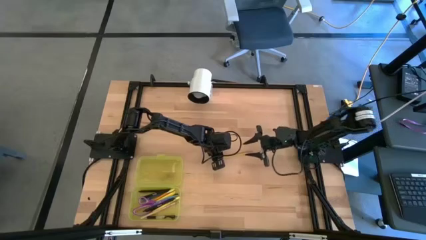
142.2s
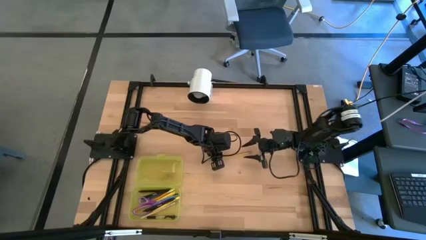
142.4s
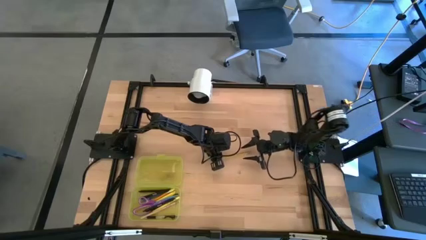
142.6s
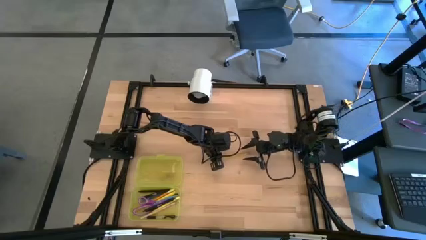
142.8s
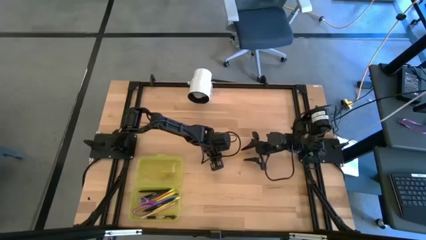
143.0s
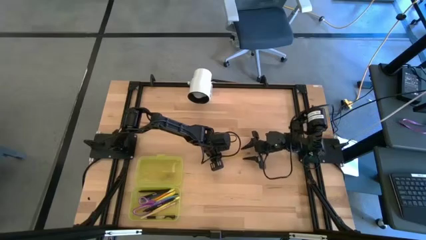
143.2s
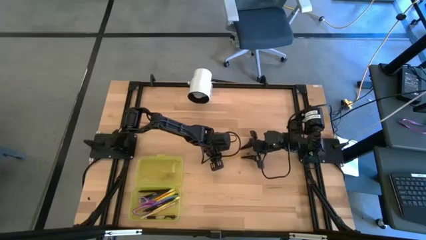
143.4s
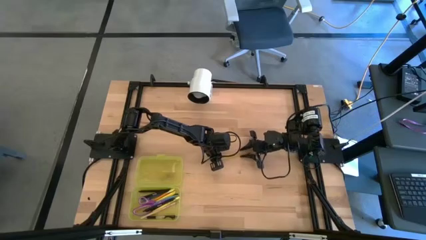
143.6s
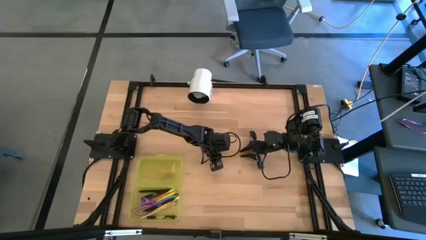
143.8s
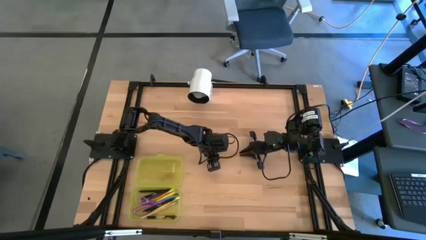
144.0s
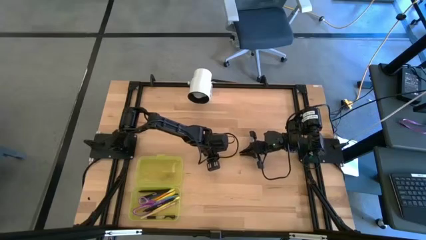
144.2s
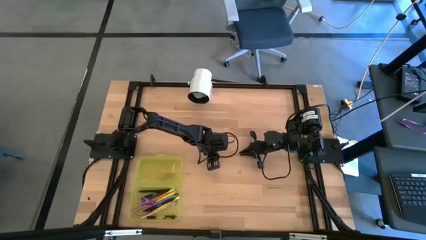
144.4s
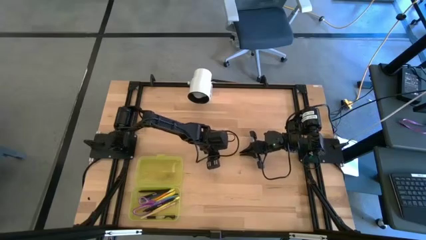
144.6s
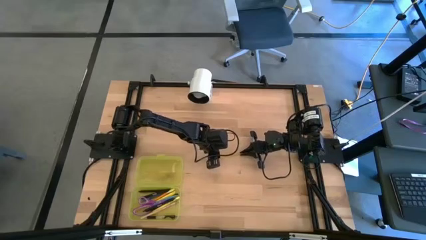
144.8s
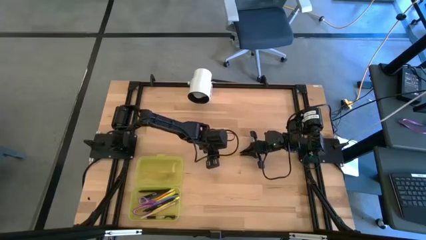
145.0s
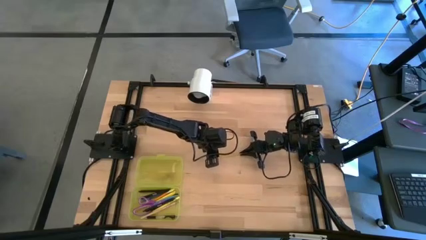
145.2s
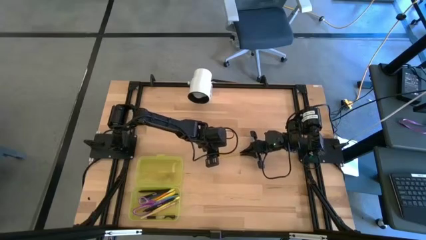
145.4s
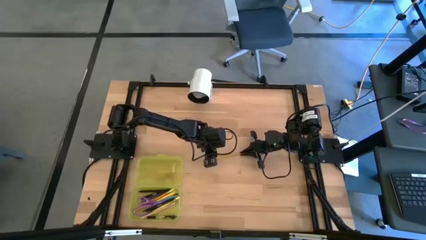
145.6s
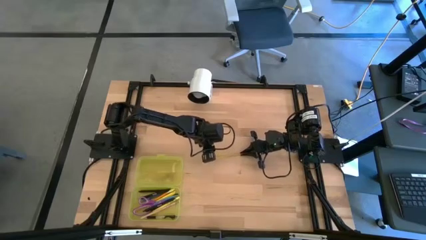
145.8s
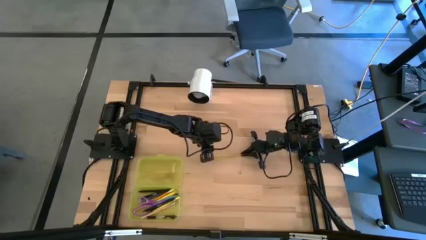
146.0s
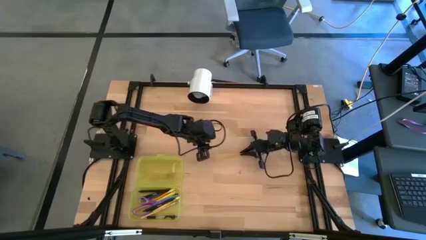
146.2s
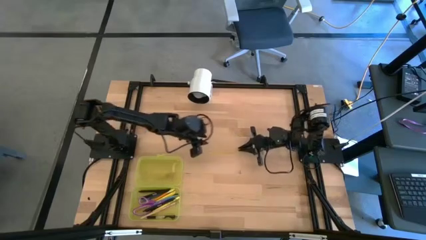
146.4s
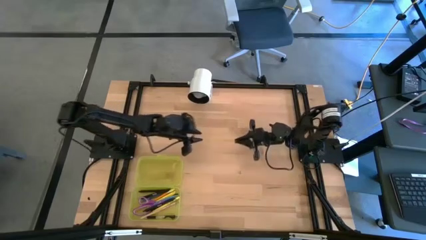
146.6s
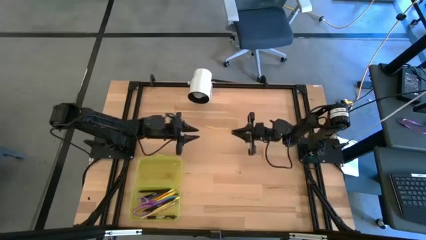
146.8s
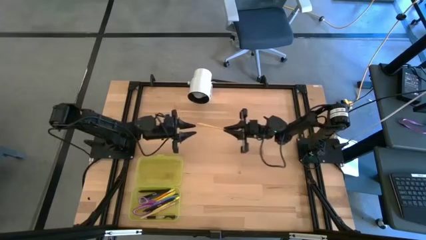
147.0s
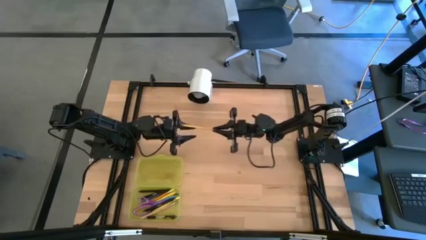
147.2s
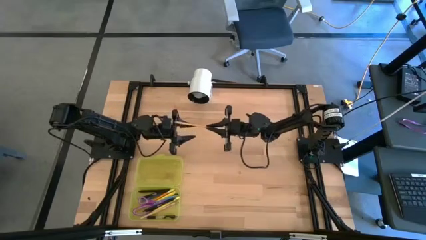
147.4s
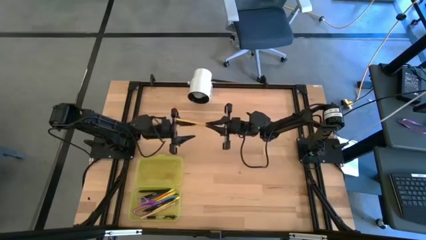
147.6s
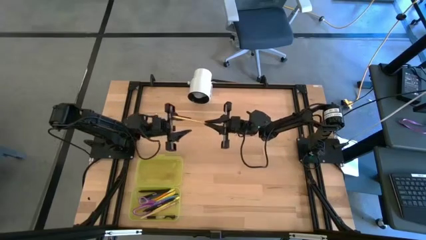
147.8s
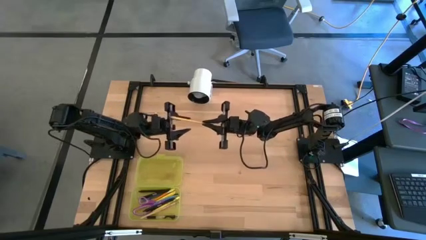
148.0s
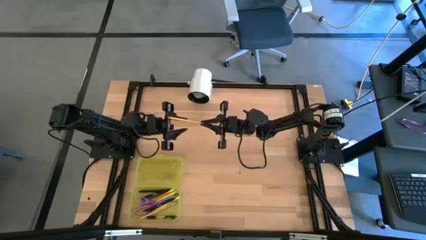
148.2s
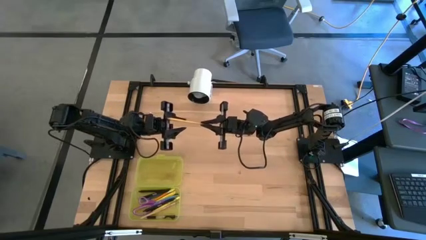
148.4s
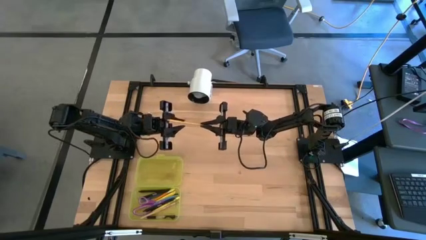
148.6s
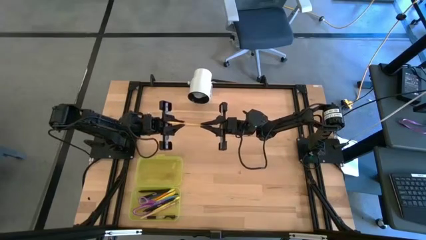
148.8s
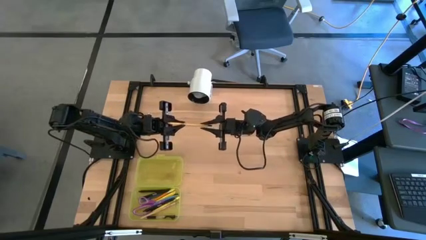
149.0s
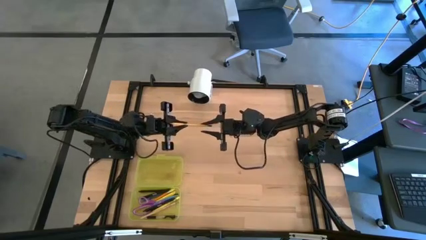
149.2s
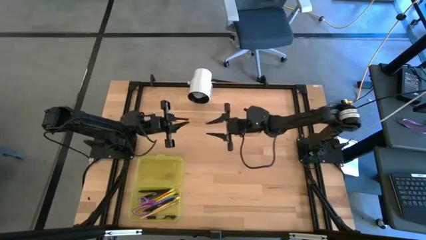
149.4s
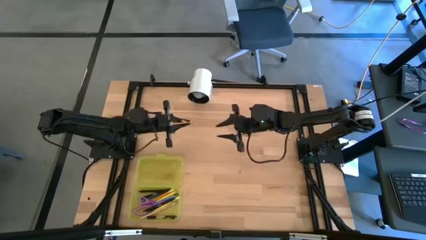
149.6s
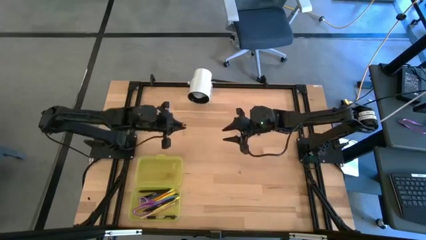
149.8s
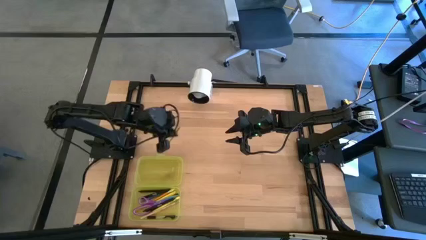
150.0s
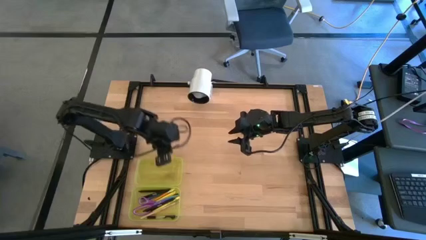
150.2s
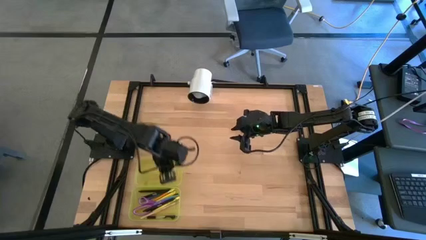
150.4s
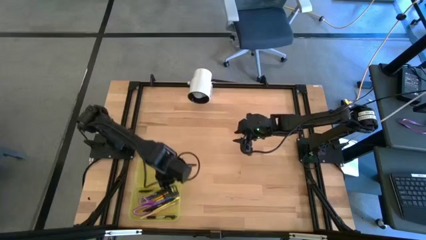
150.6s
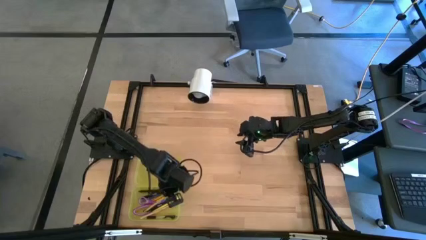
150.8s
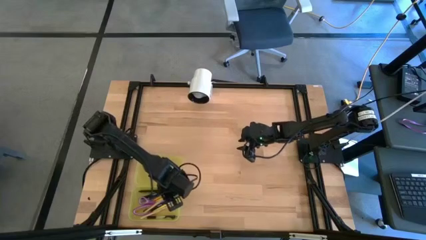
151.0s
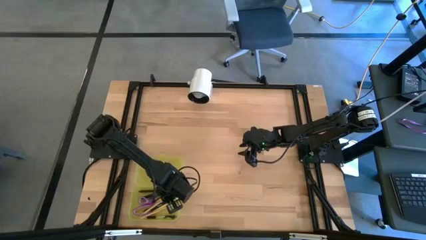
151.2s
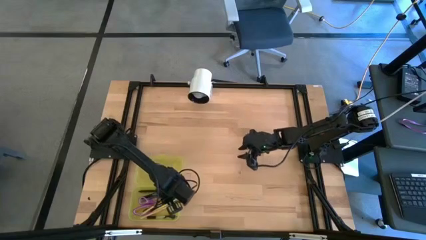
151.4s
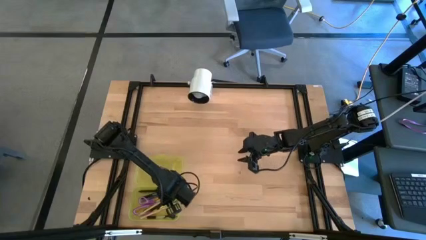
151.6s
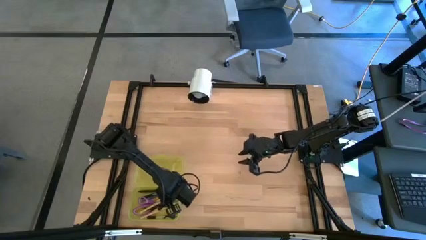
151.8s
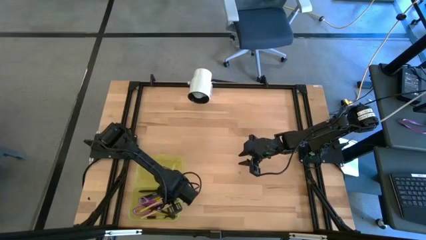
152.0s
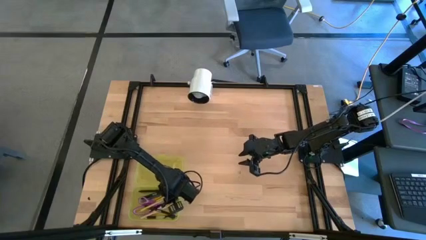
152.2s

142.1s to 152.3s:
Task: Pick & place school supplies into a supply box
Put the yellow pencil into the yellow supply box

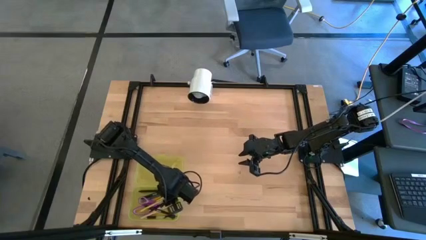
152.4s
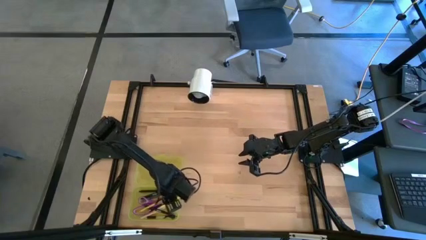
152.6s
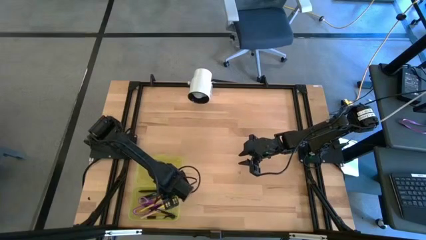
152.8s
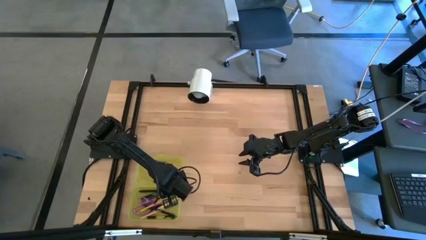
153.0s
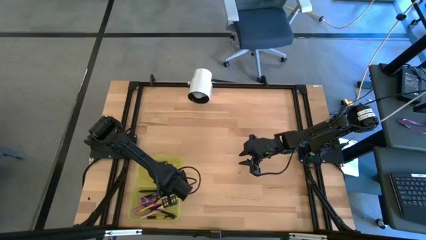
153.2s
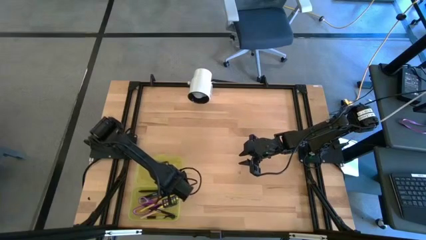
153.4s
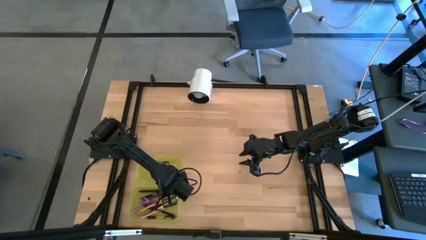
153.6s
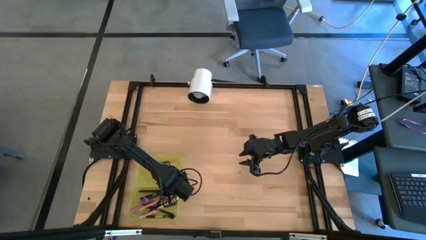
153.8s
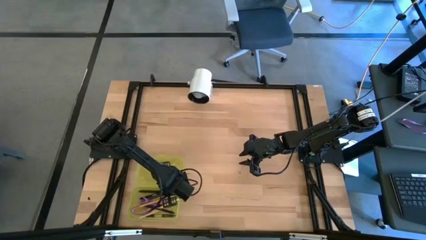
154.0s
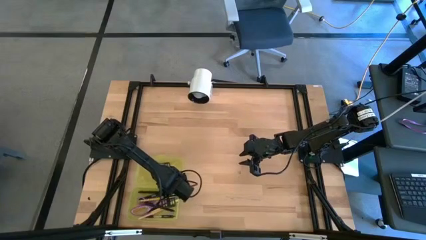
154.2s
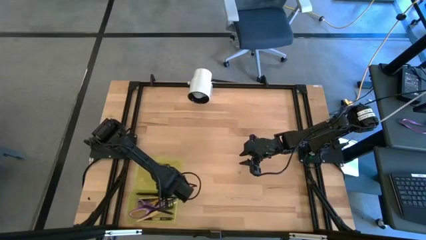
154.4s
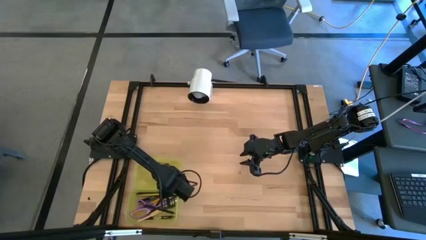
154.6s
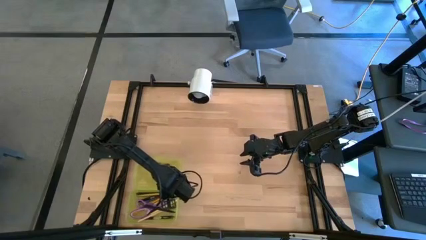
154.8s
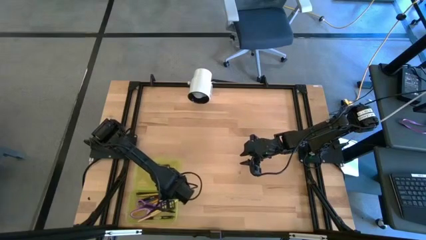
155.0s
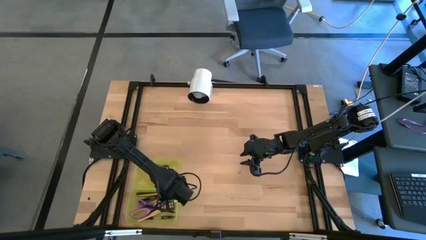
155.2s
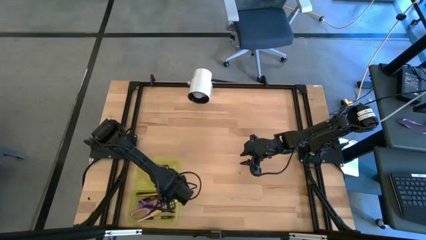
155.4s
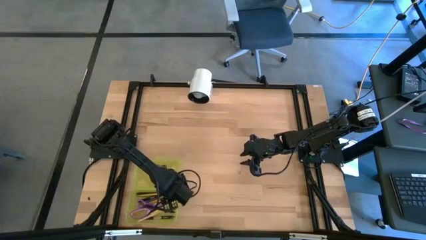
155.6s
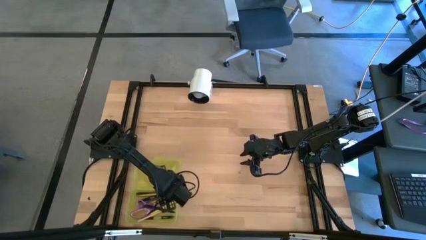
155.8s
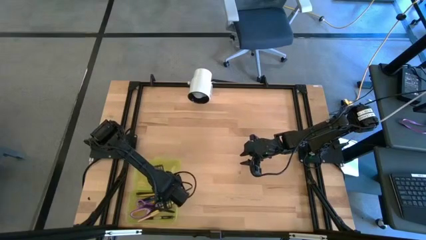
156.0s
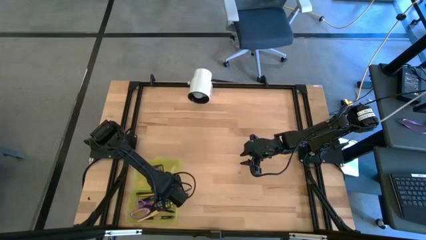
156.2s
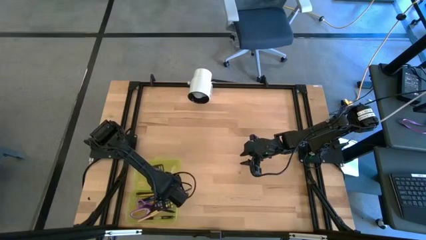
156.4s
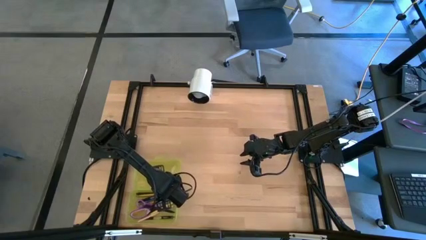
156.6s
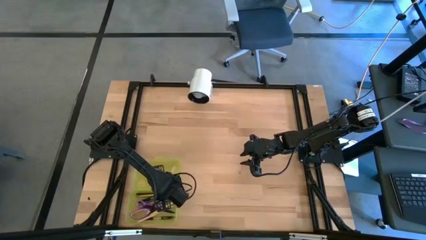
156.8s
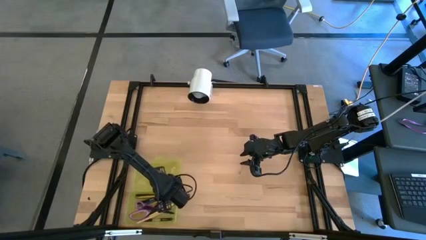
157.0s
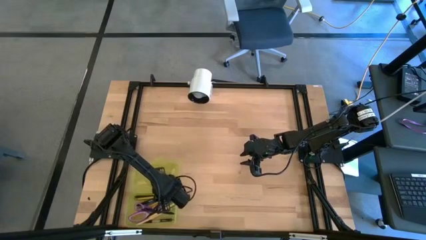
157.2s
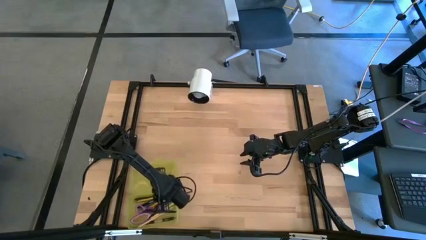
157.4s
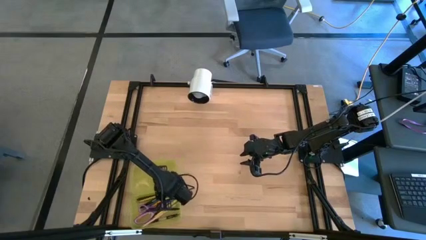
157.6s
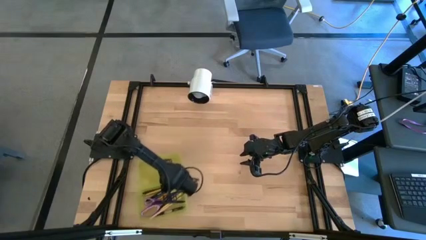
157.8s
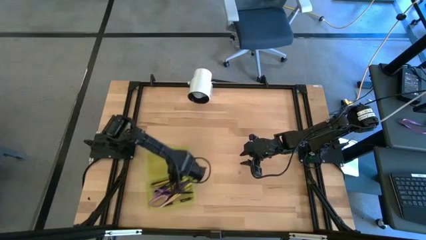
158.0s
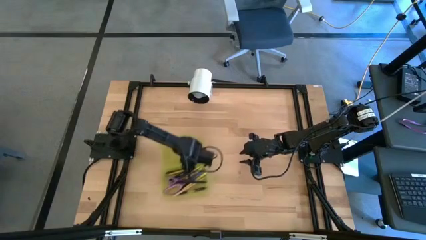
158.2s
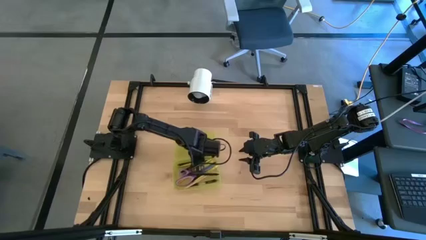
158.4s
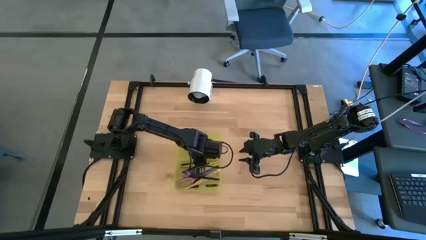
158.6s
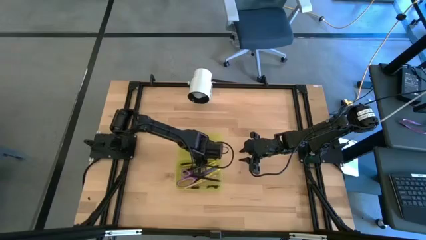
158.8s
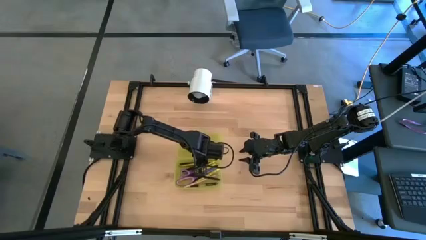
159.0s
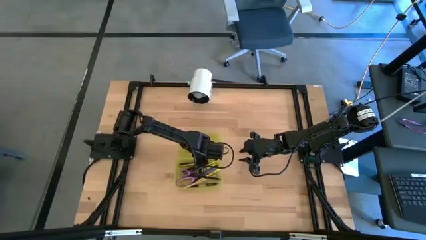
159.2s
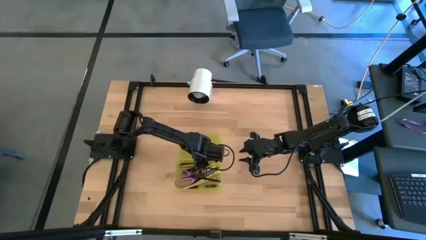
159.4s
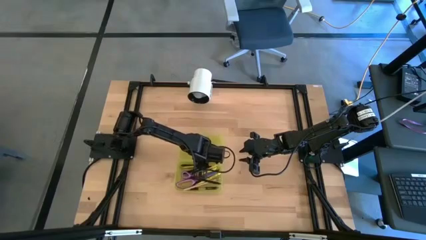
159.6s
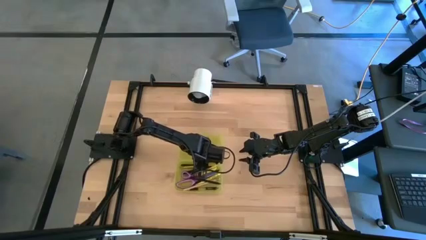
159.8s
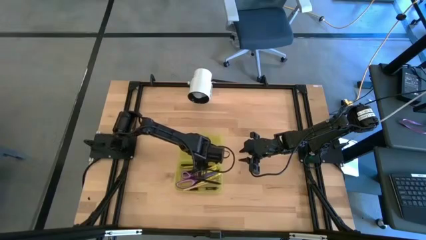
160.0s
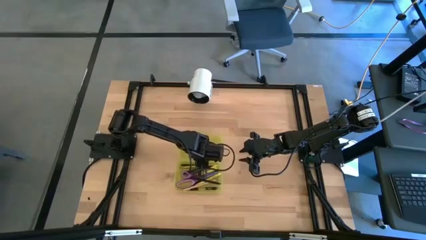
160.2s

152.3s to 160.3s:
Move the yellow supply box to the center of the table
